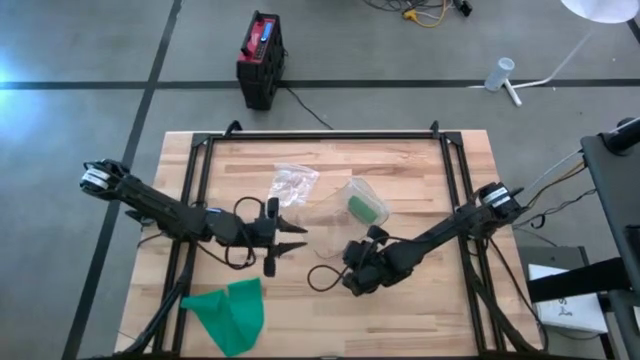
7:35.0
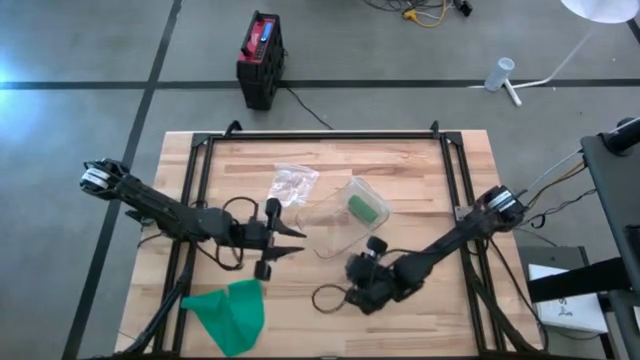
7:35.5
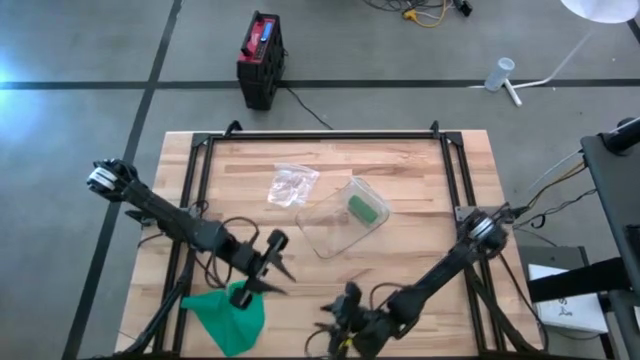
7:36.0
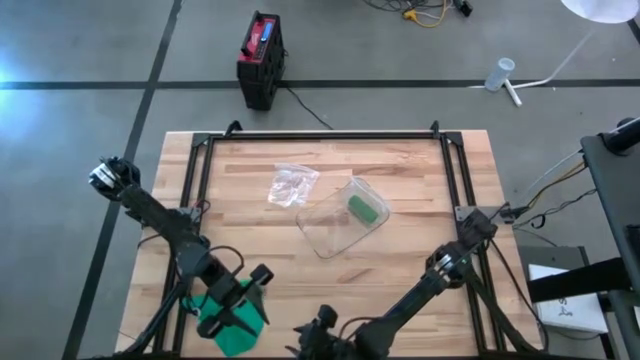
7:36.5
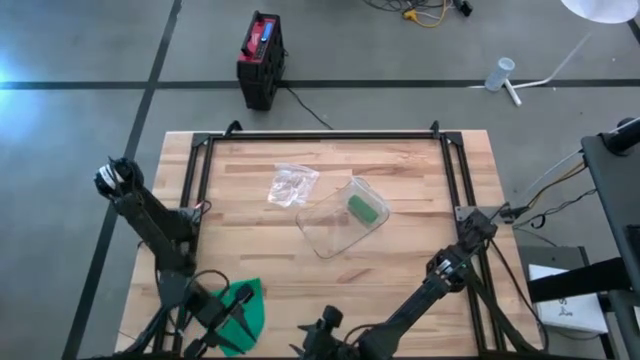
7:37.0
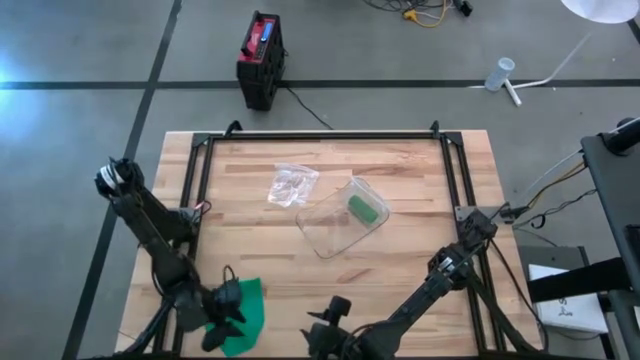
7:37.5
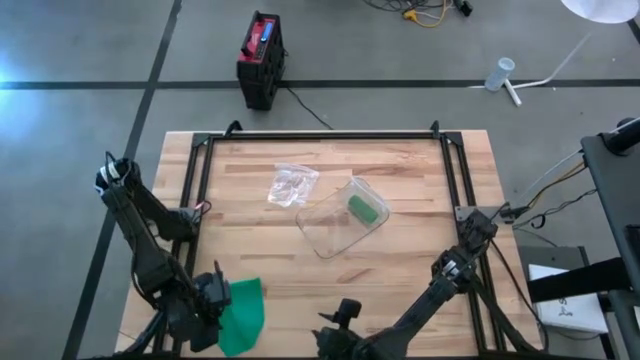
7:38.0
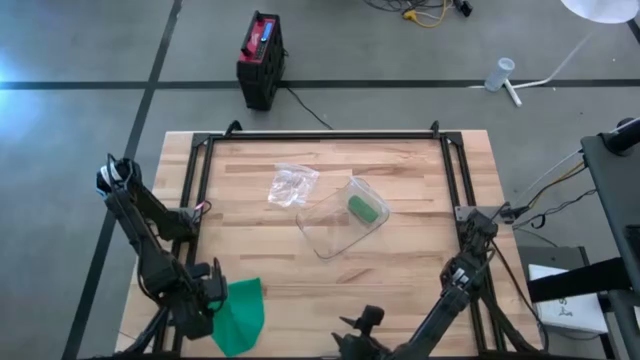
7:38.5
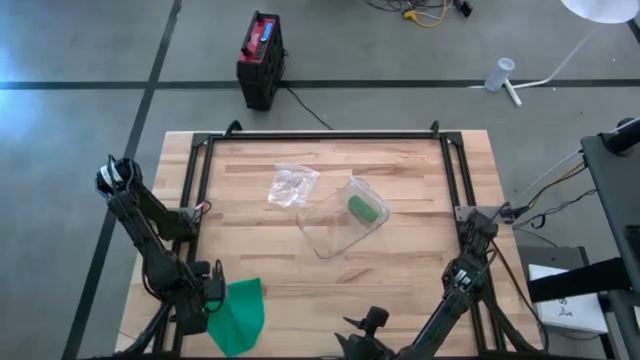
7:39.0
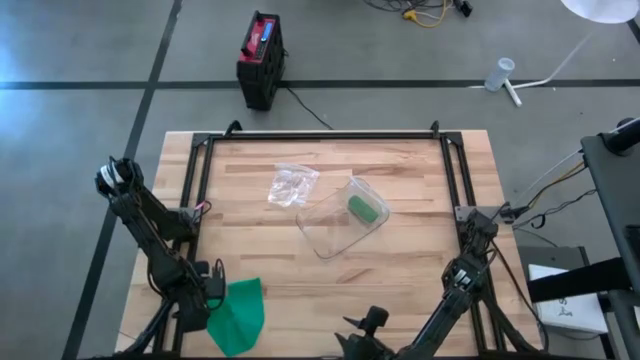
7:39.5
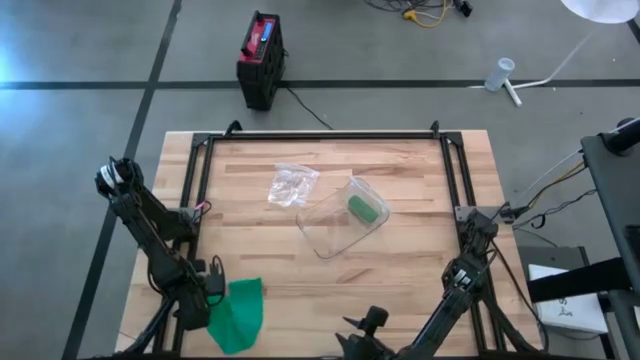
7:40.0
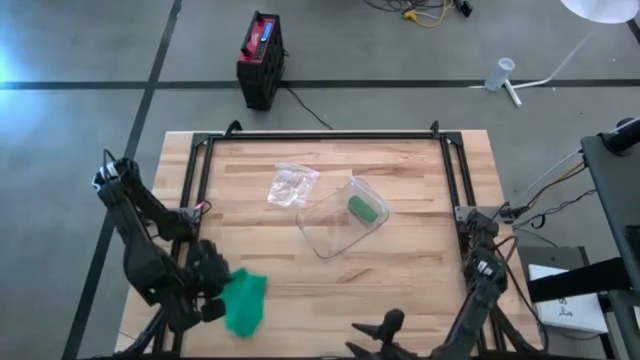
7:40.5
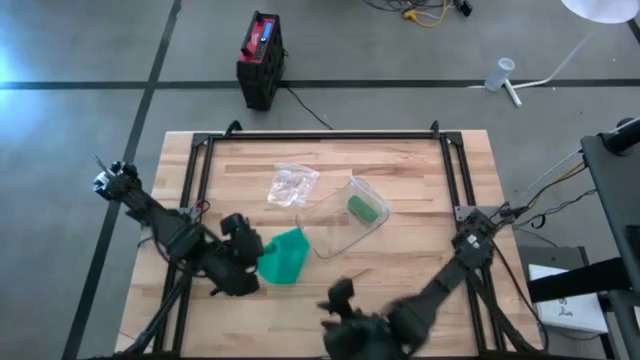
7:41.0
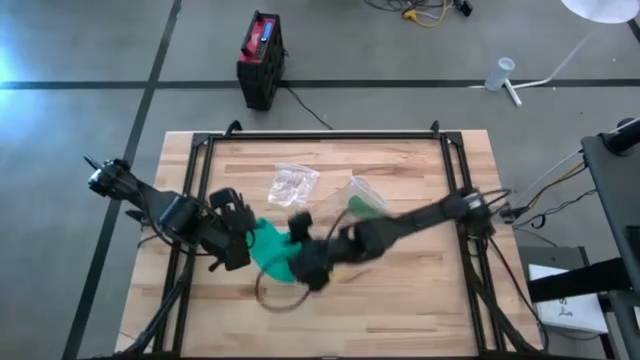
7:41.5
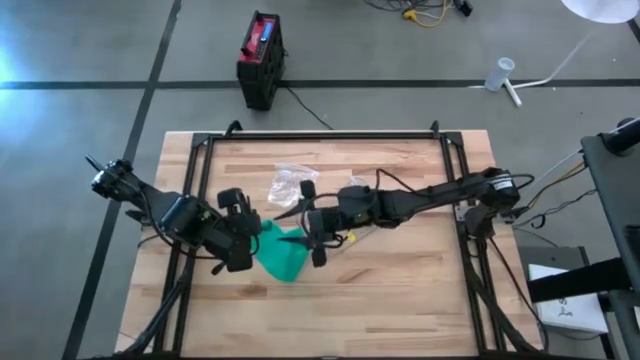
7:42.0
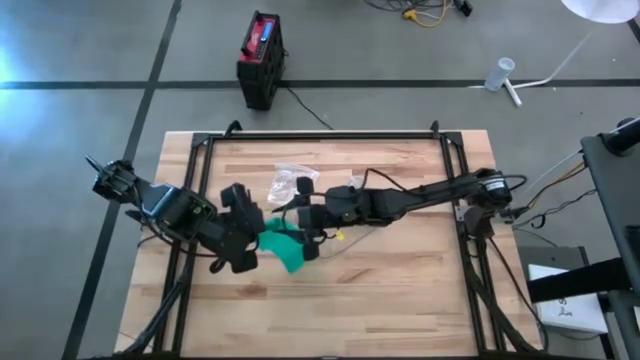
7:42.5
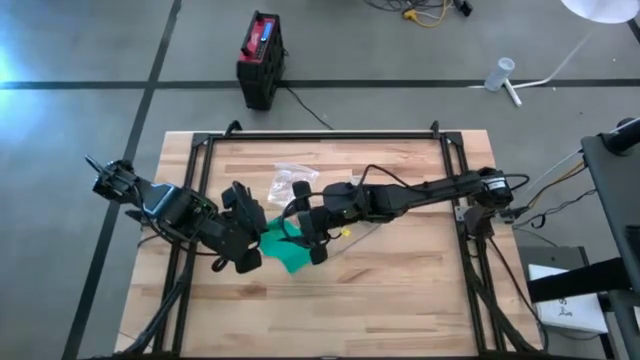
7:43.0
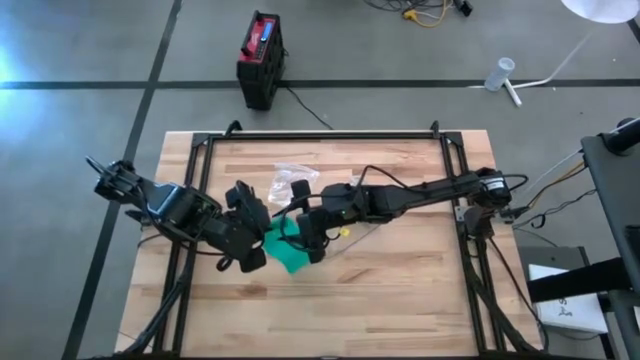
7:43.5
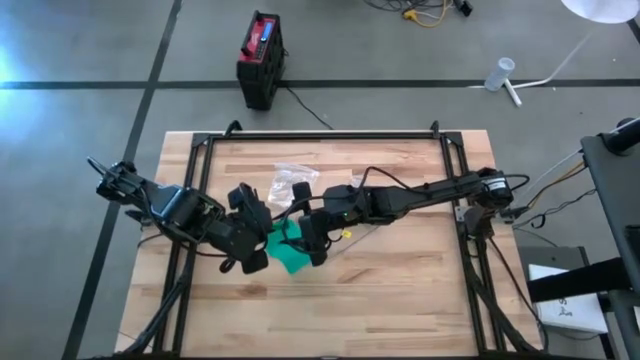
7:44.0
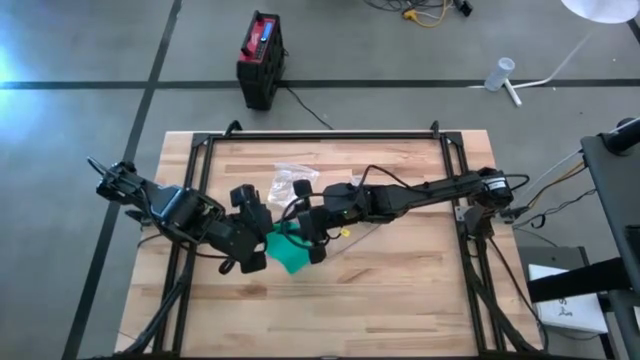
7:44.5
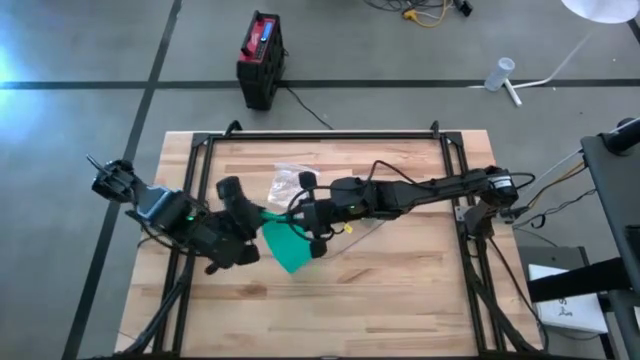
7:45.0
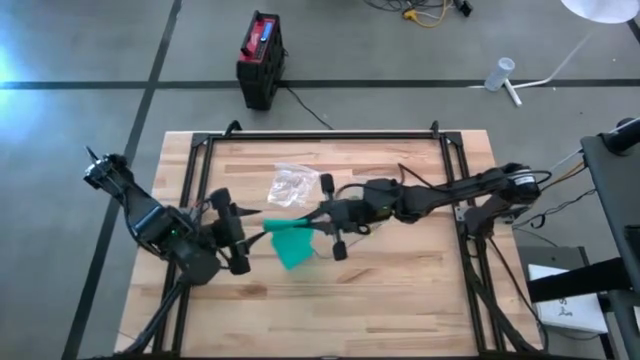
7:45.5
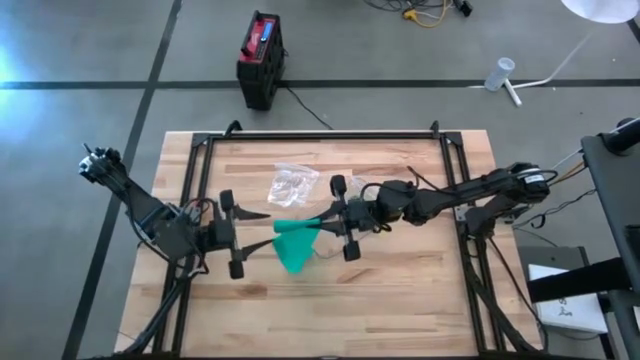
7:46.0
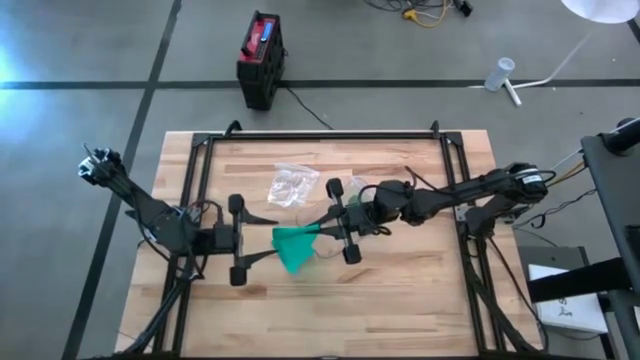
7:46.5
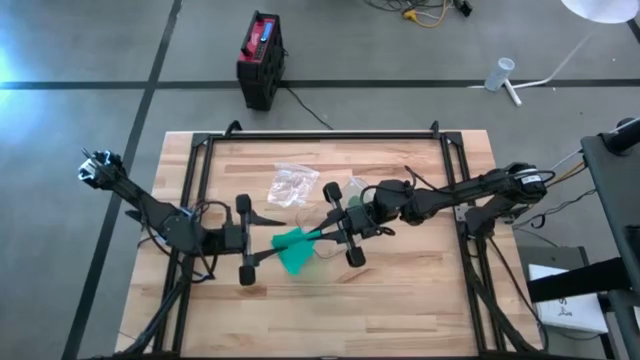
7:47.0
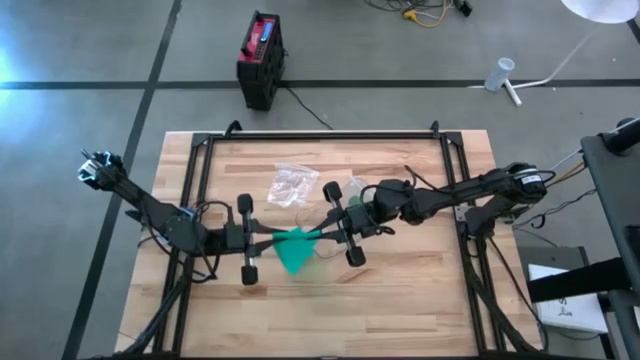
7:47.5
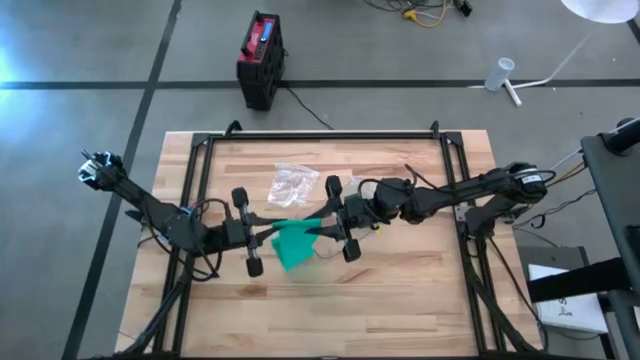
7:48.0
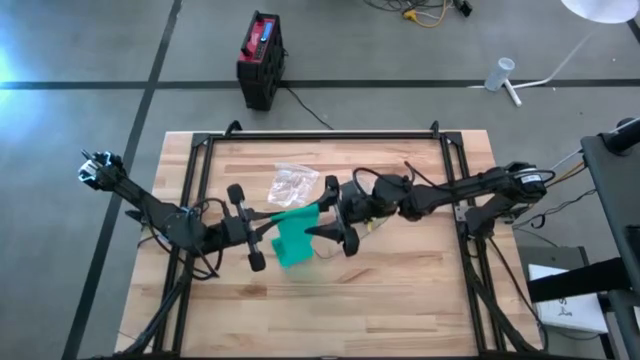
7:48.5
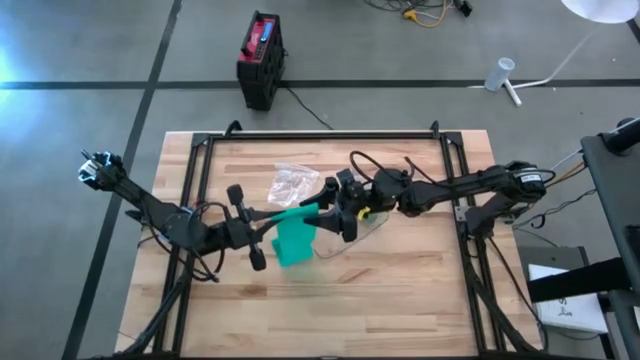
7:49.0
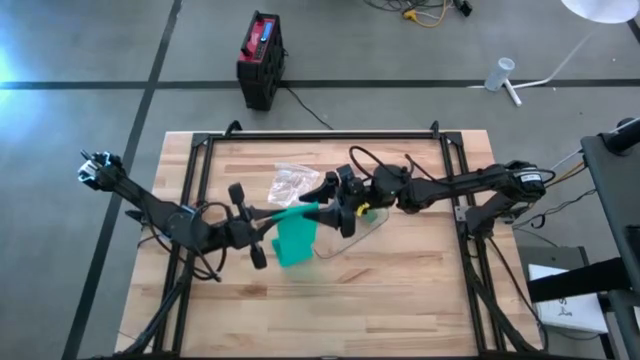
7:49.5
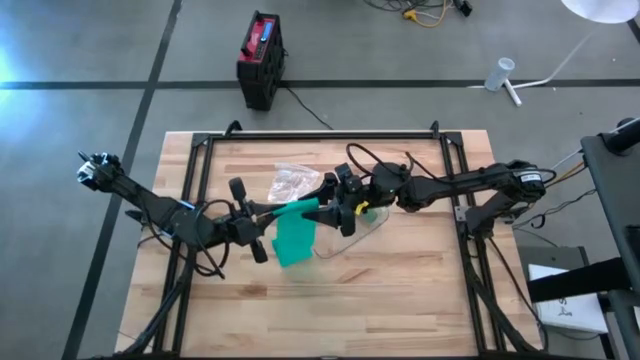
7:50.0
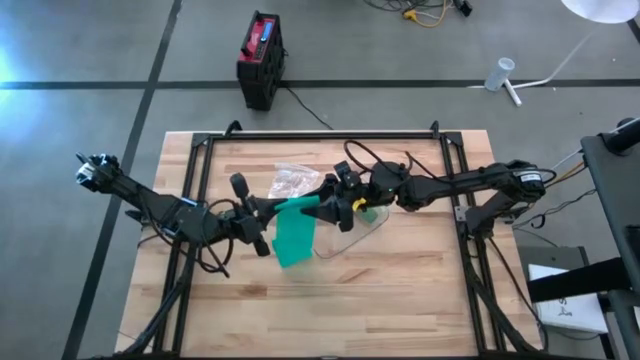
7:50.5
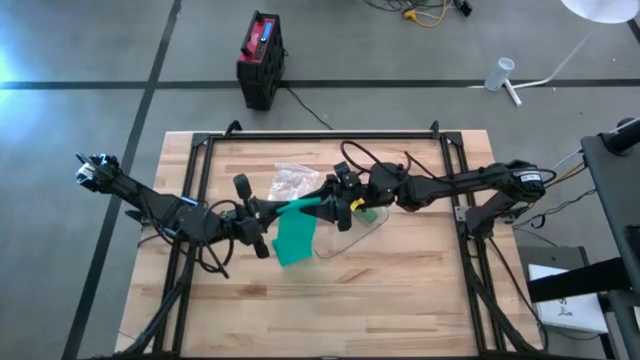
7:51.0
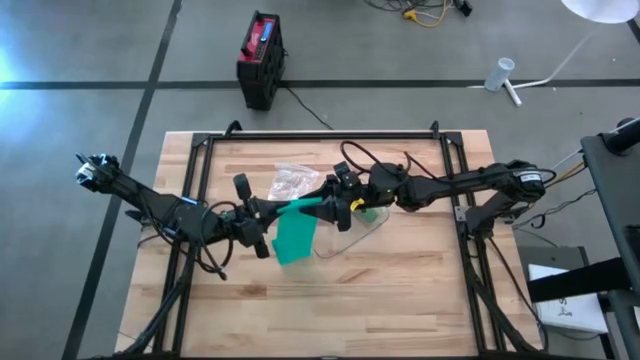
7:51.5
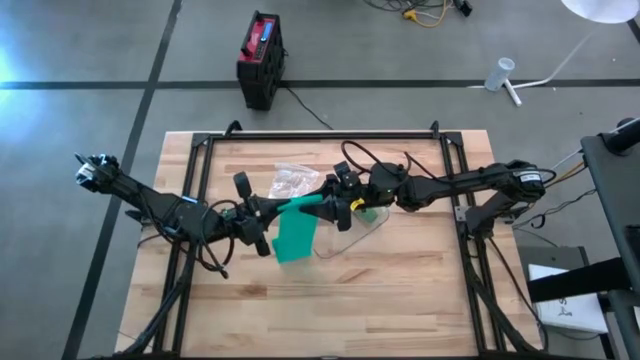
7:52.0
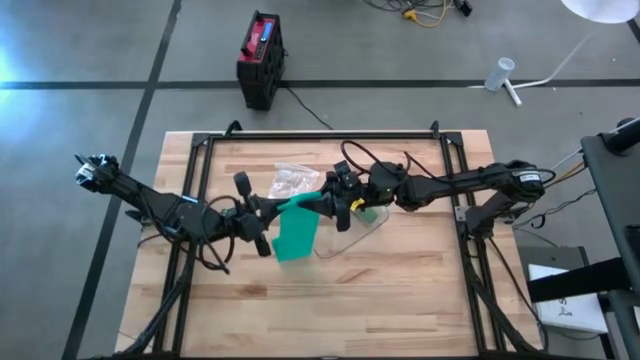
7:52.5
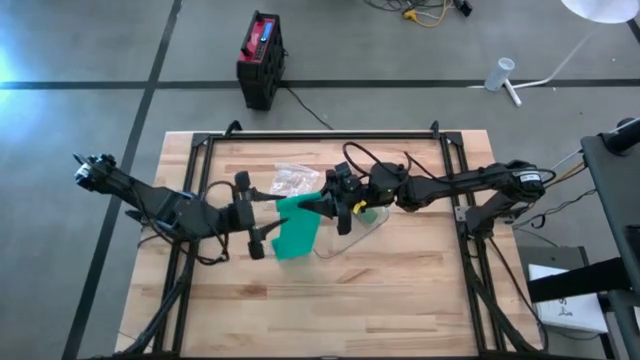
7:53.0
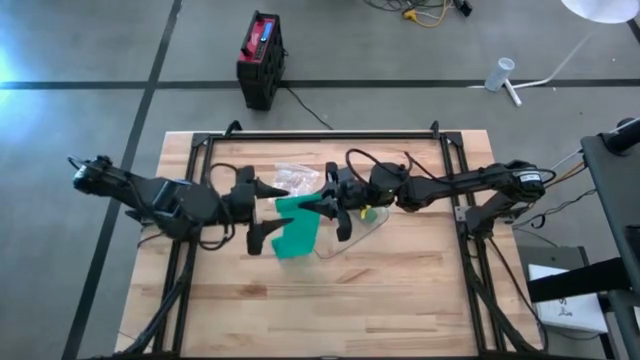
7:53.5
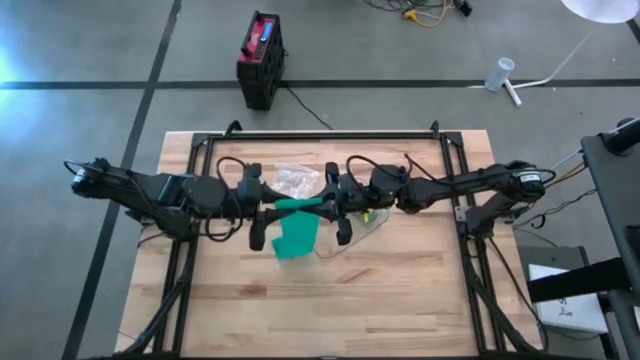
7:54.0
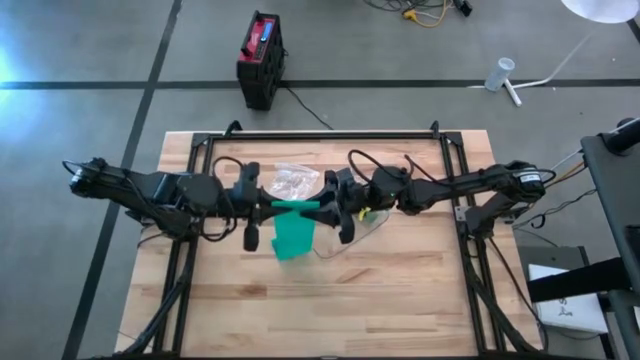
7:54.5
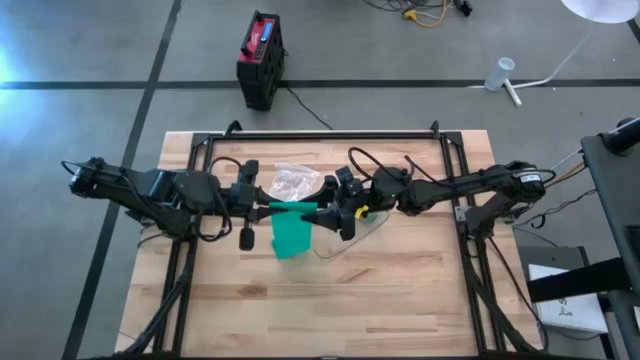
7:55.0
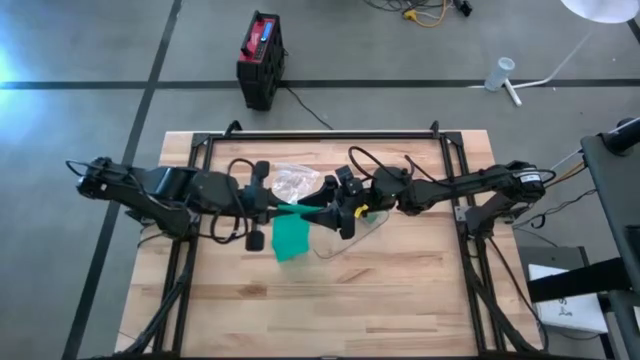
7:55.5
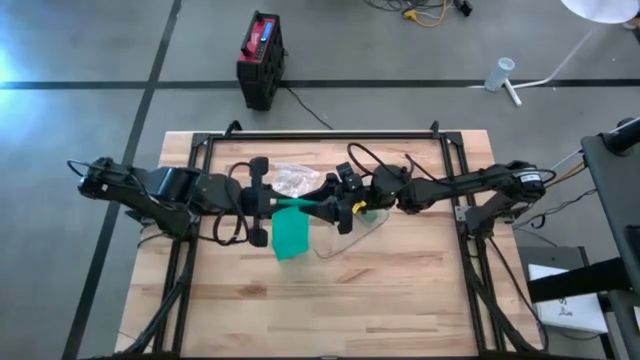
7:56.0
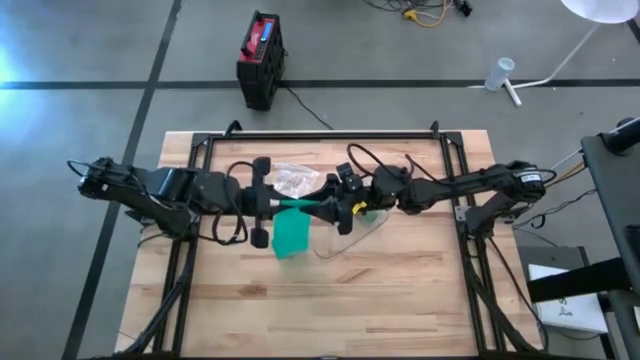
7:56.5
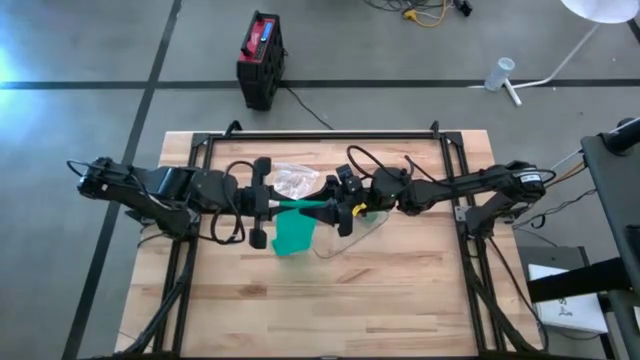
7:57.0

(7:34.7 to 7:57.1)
Task: Roll bandage
Roll the dark green bandage
